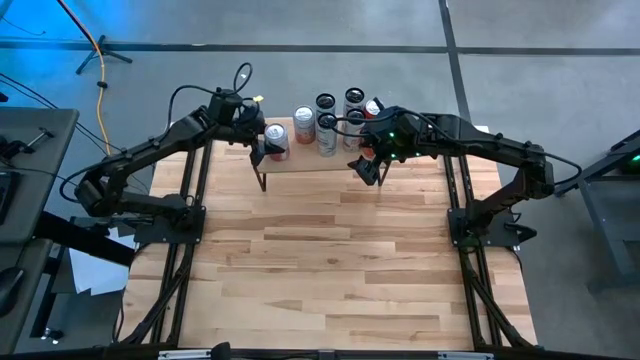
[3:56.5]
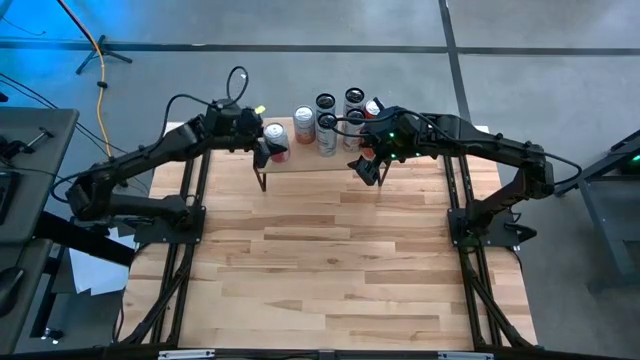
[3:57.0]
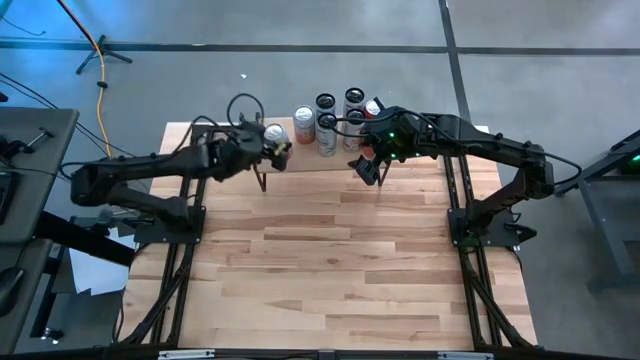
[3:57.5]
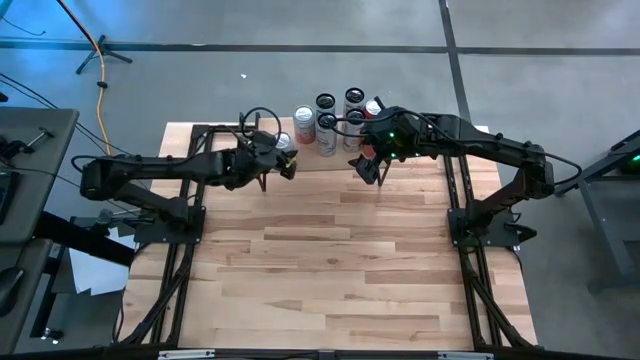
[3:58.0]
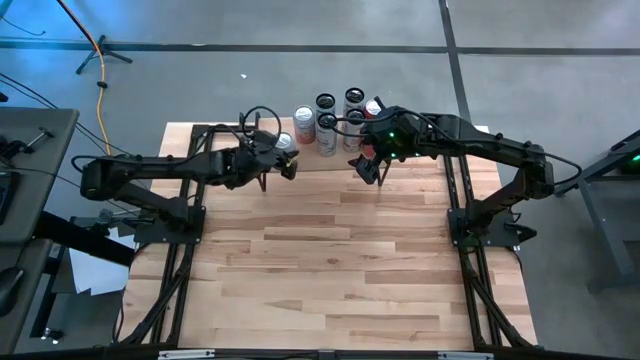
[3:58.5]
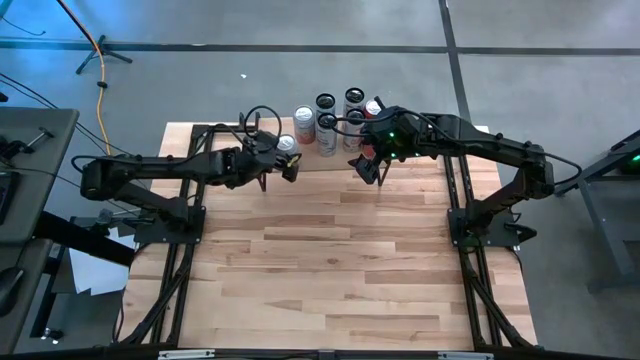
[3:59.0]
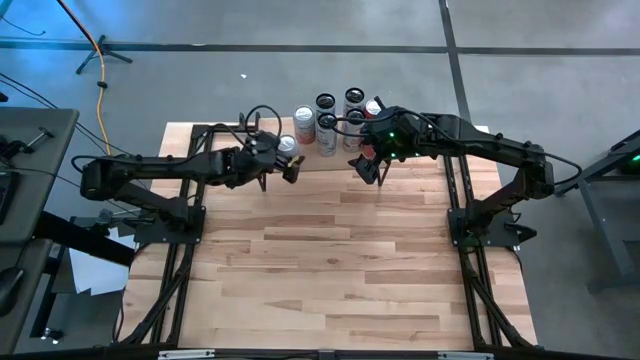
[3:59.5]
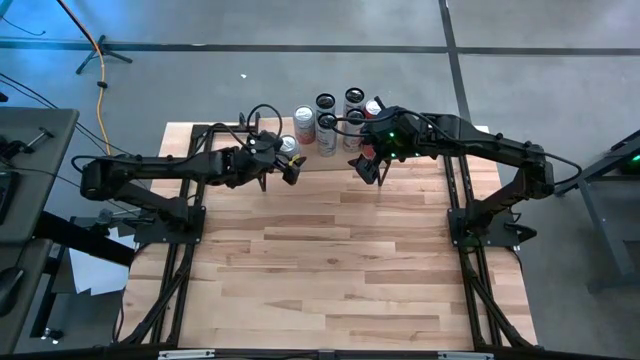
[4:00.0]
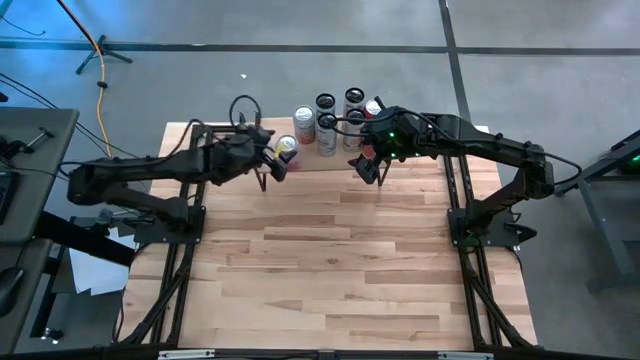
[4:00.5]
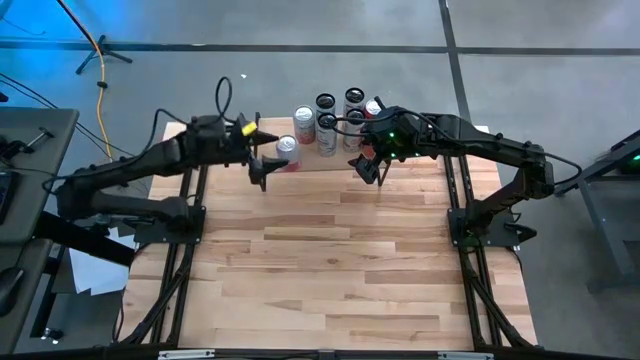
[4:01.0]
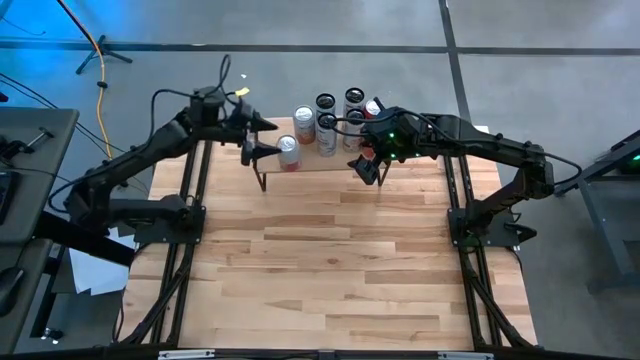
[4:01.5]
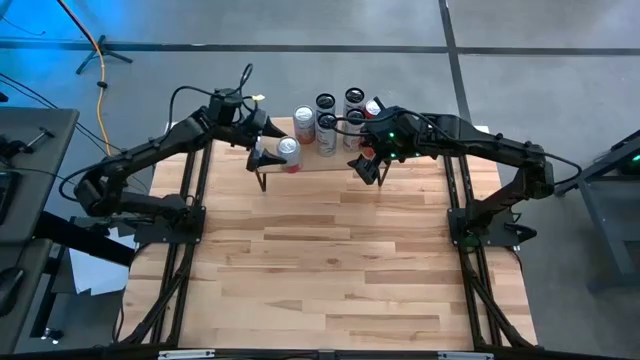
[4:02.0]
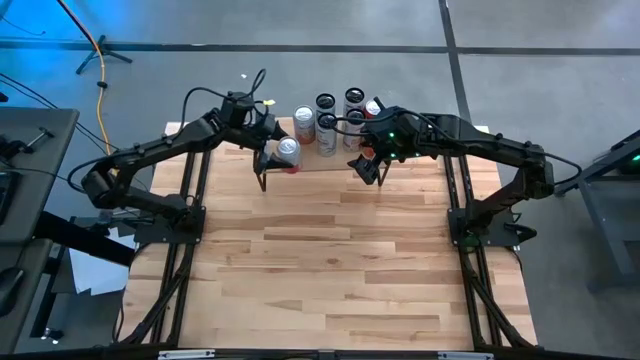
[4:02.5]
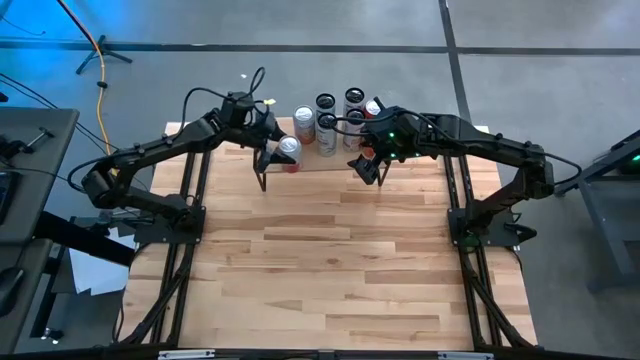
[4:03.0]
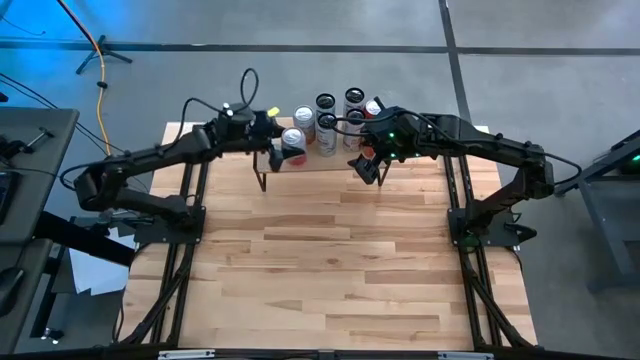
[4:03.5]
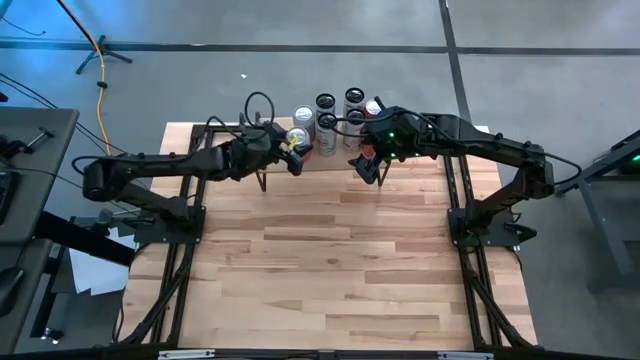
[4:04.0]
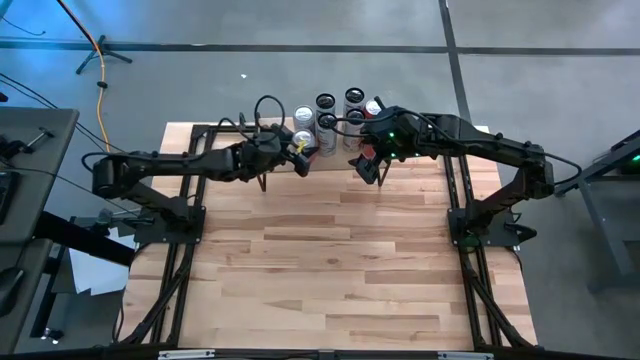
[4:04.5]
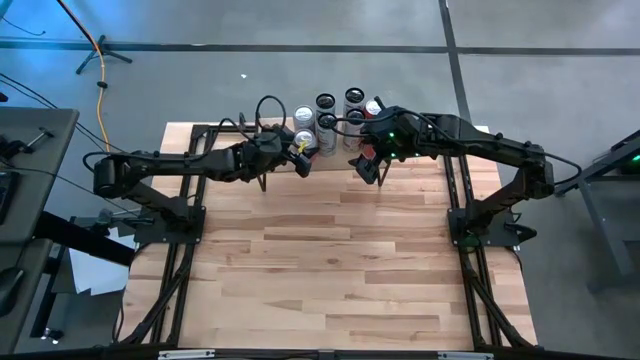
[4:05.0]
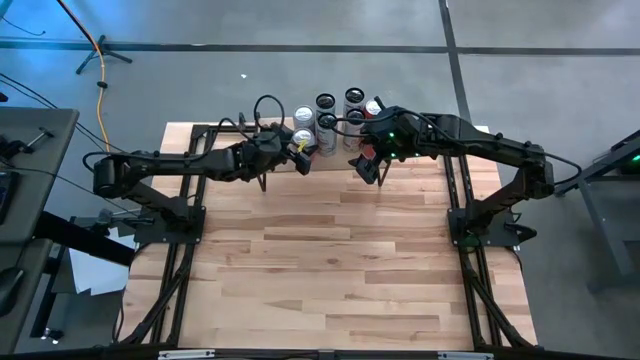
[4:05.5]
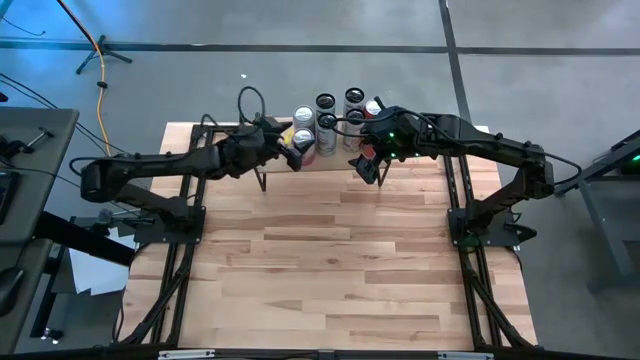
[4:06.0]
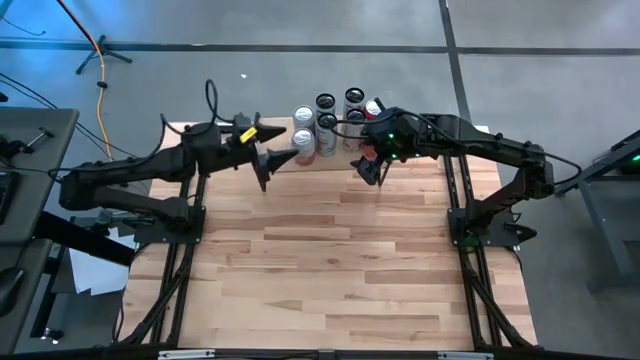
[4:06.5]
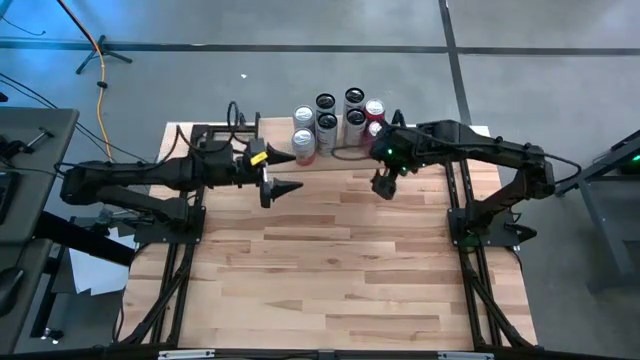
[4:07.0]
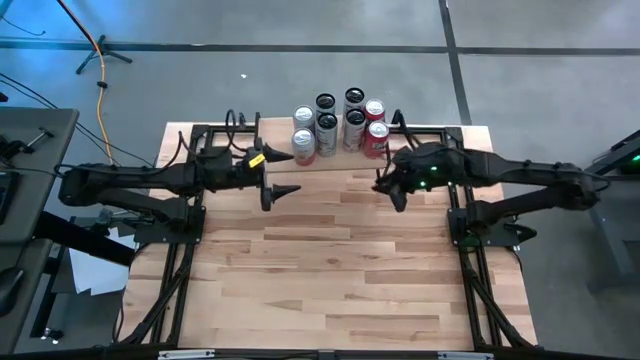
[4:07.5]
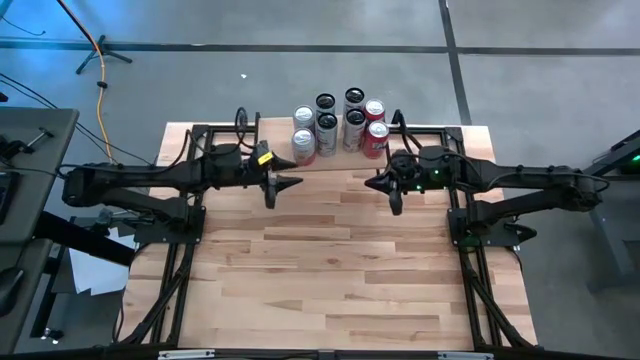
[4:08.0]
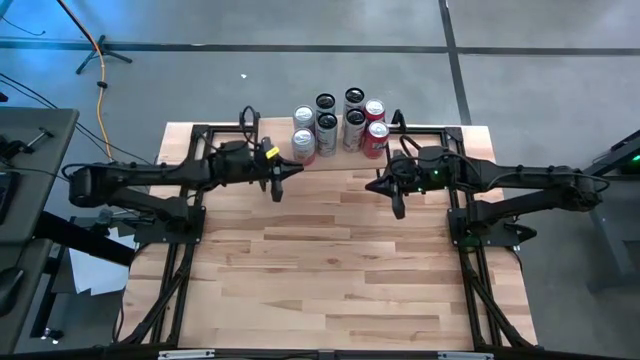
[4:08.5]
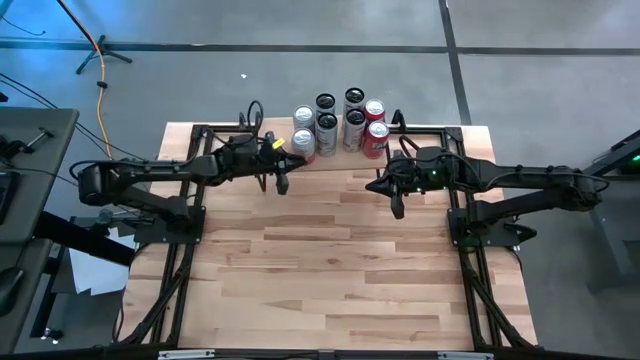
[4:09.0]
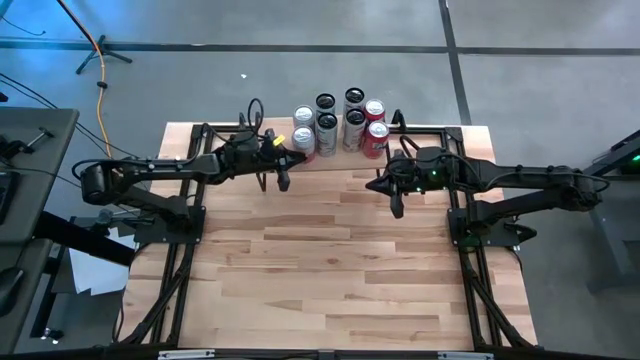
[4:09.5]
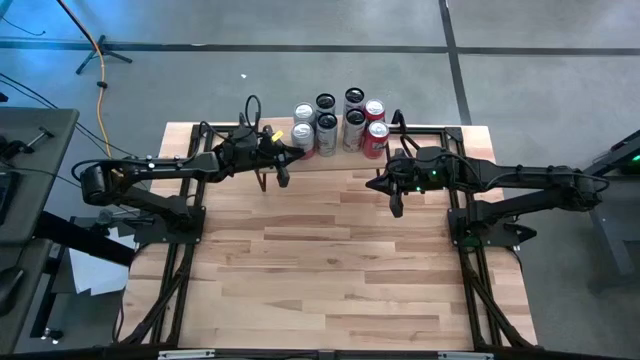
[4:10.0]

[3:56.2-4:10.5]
Task: Place canned beverage on shelf
Put the silver soda can on the shelf

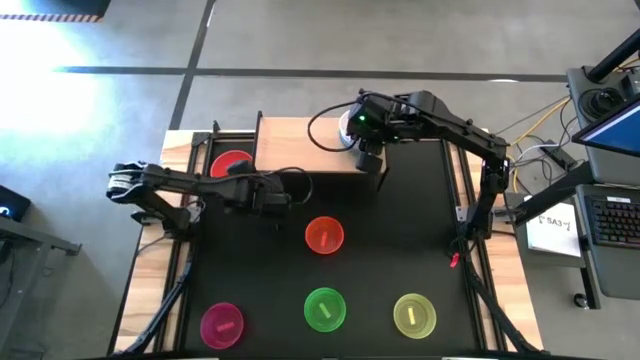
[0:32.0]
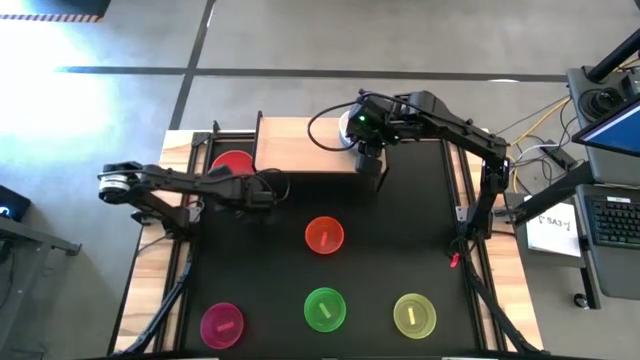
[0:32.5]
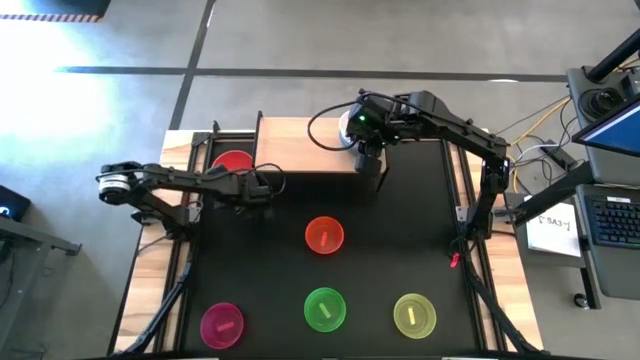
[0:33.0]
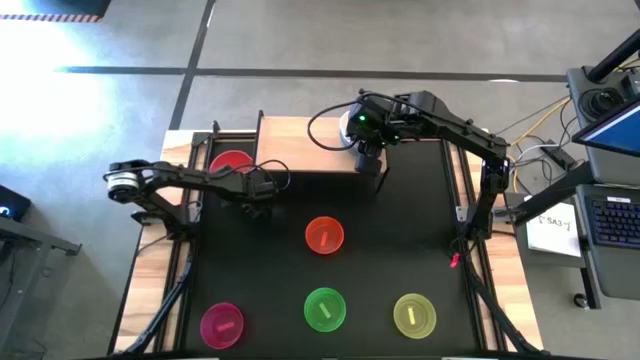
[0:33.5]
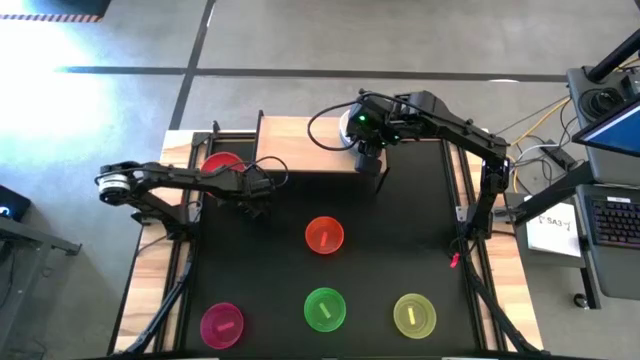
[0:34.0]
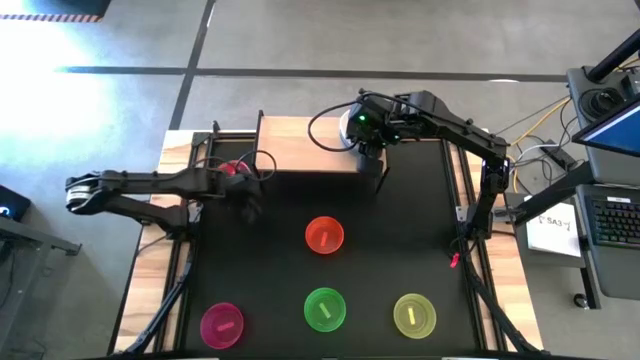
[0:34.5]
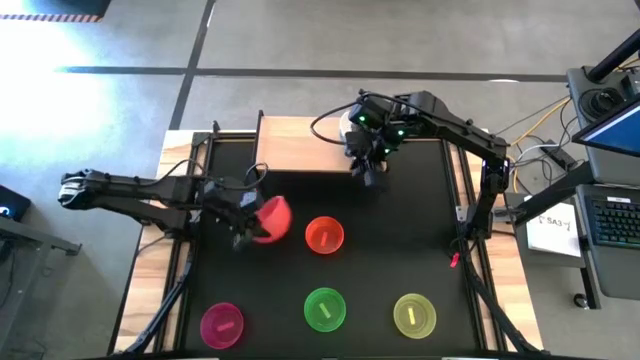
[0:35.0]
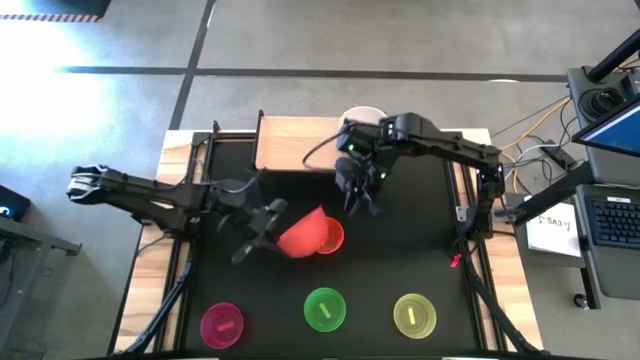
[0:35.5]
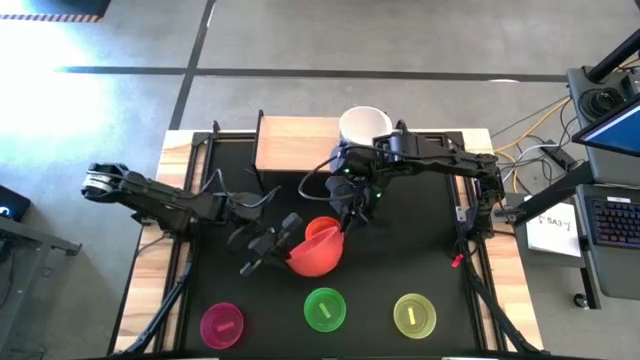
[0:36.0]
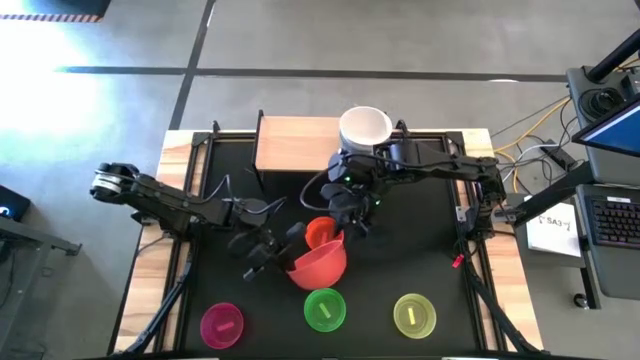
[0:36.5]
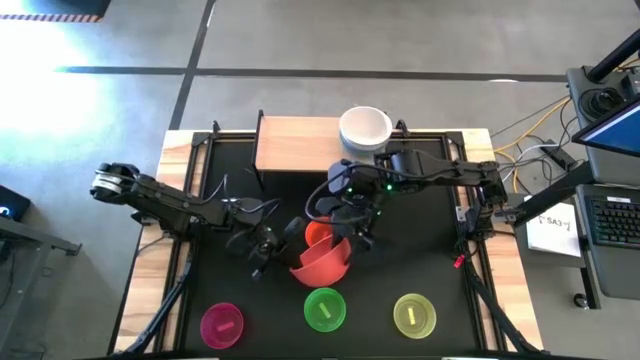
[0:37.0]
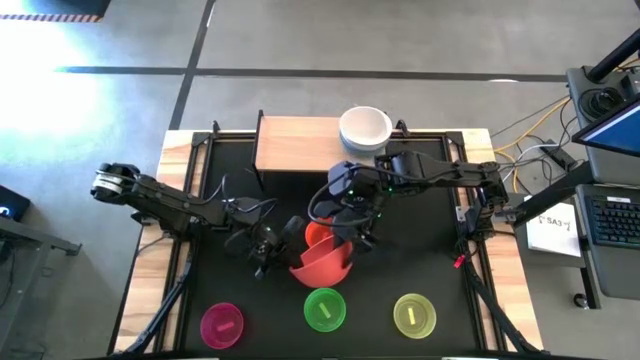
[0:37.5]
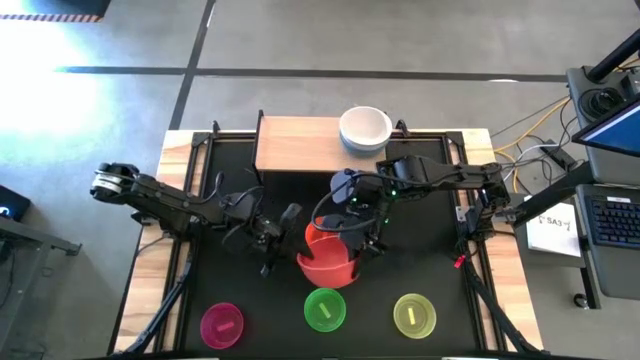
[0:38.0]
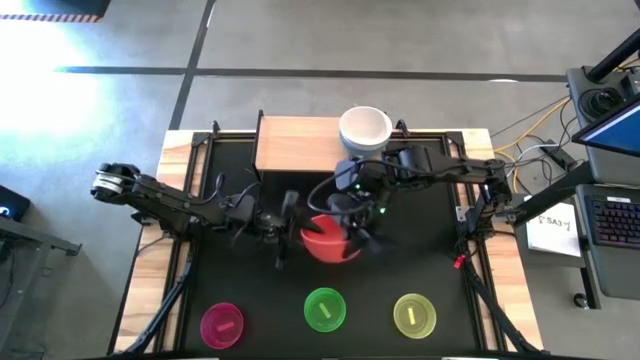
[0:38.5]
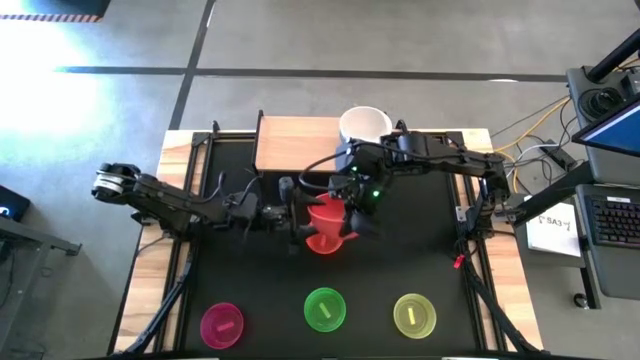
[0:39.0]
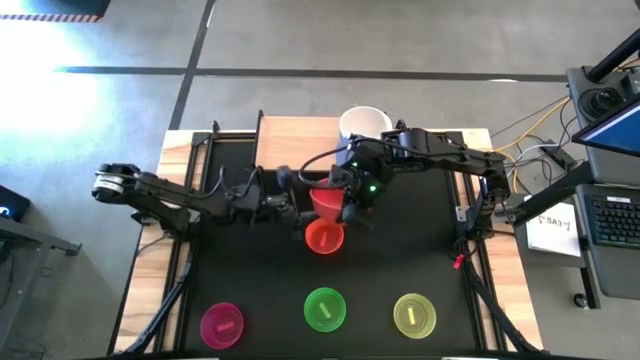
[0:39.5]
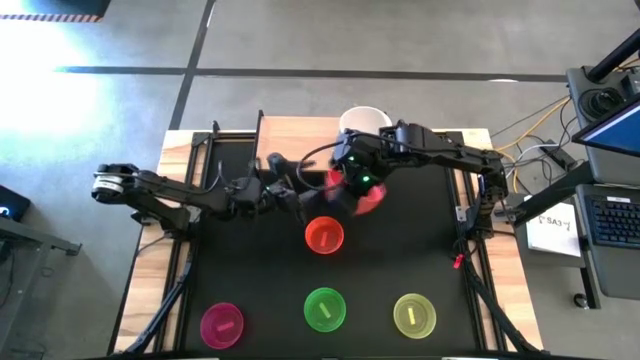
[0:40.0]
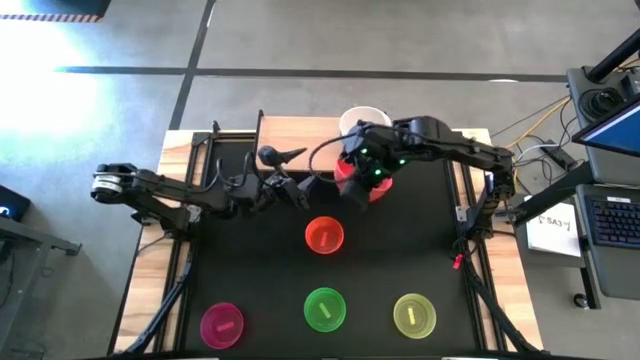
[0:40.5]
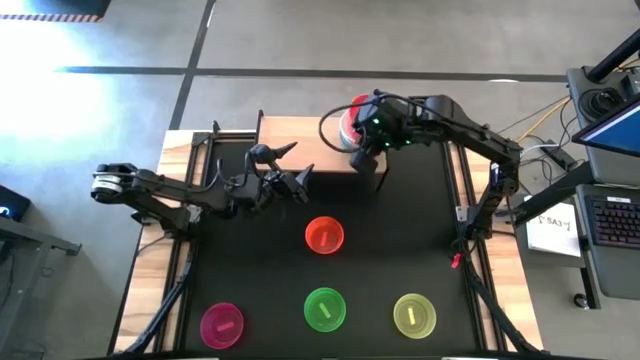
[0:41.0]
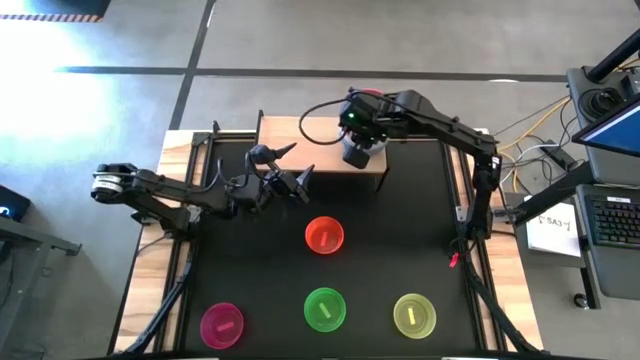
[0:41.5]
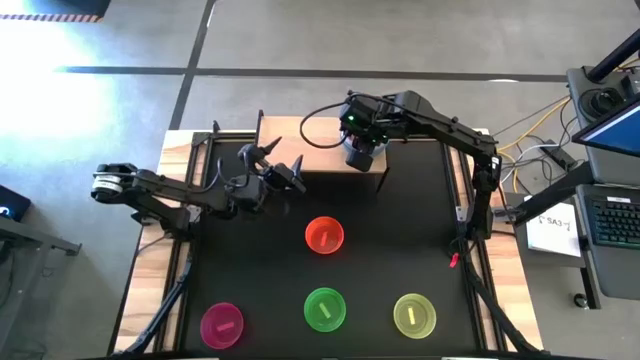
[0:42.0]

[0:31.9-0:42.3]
Task: Place and stack bowls onto a shelf
Stack the orange bowl on top of the white bowl on the shelf
